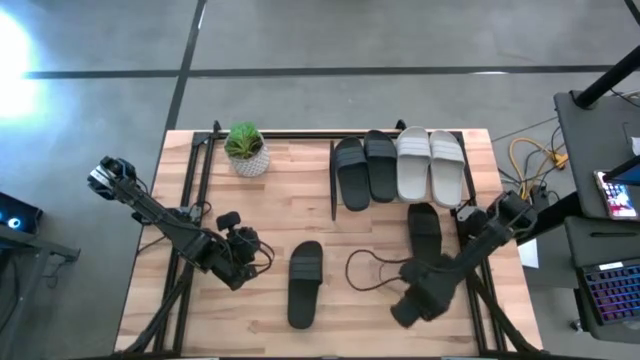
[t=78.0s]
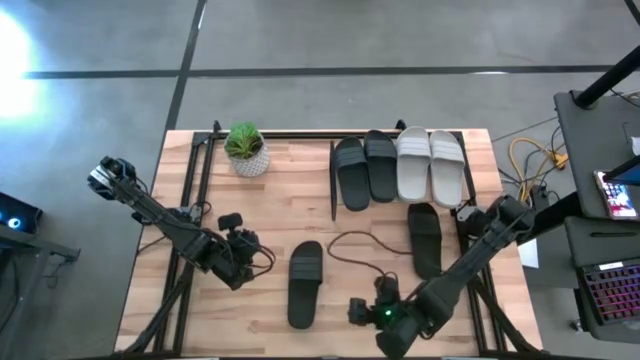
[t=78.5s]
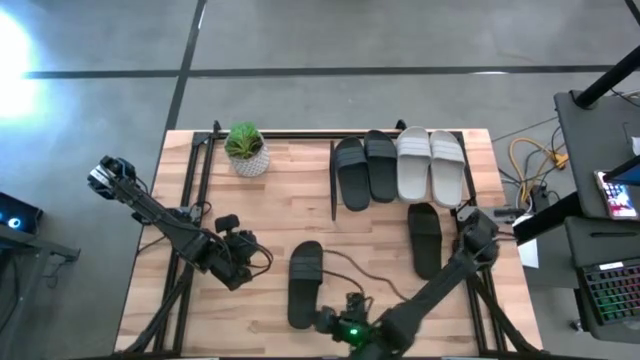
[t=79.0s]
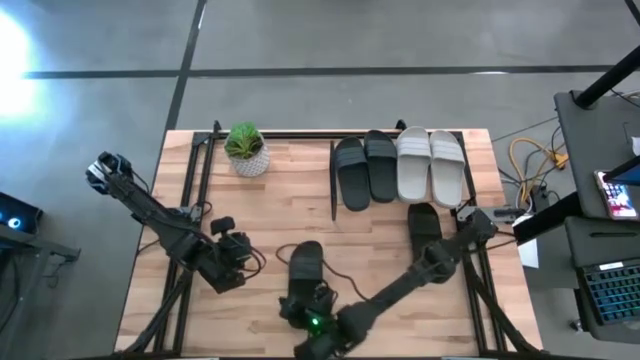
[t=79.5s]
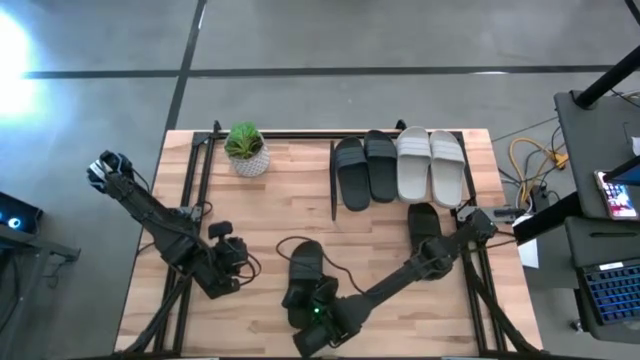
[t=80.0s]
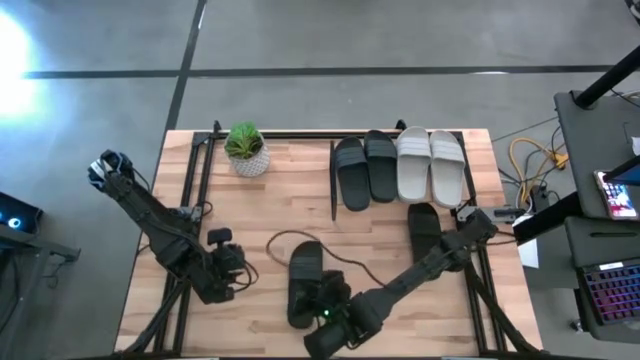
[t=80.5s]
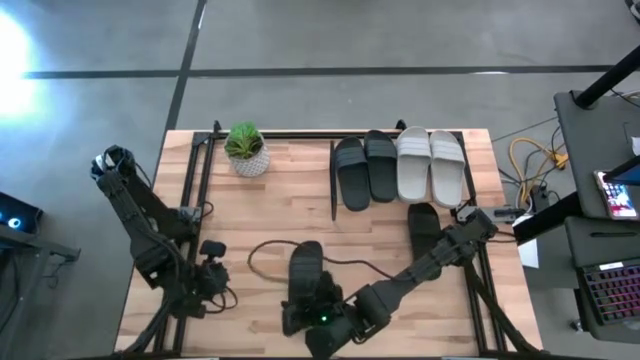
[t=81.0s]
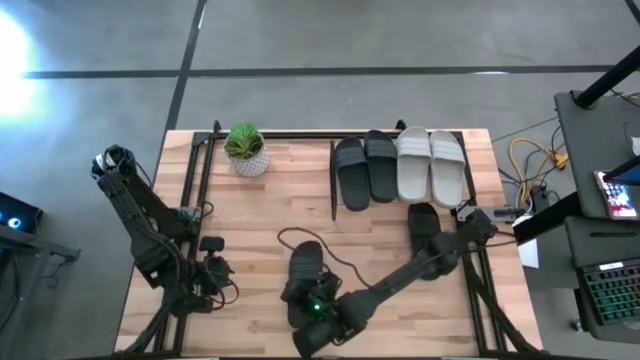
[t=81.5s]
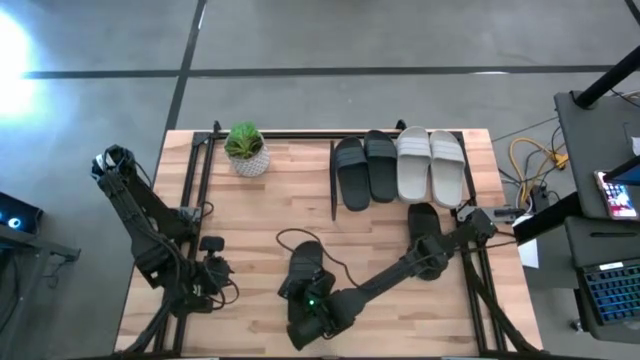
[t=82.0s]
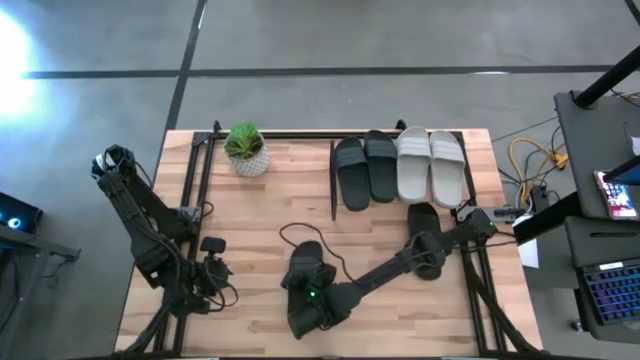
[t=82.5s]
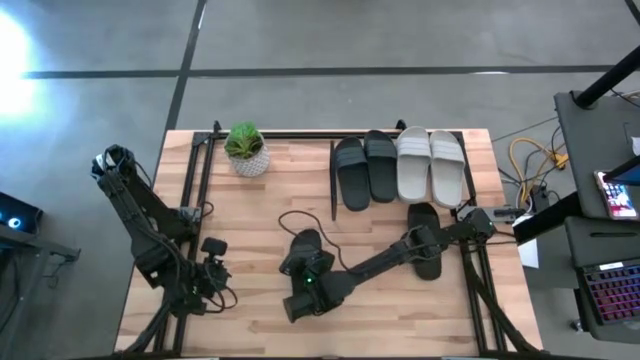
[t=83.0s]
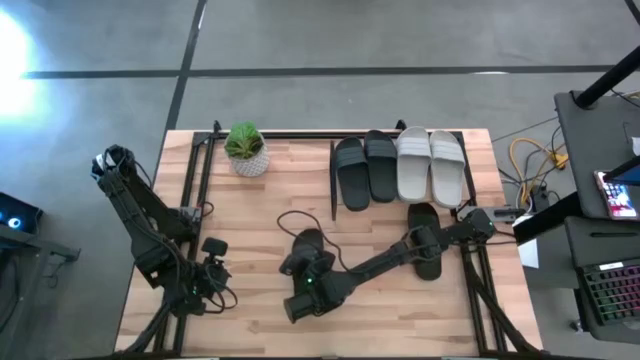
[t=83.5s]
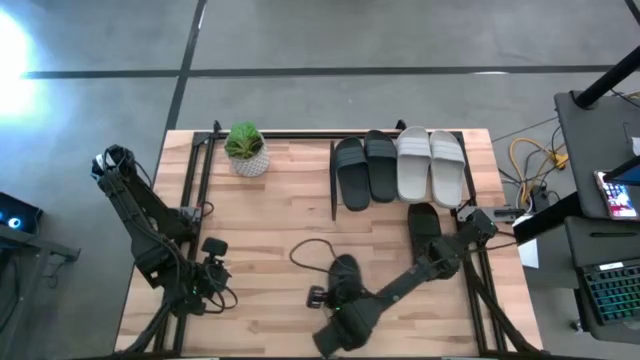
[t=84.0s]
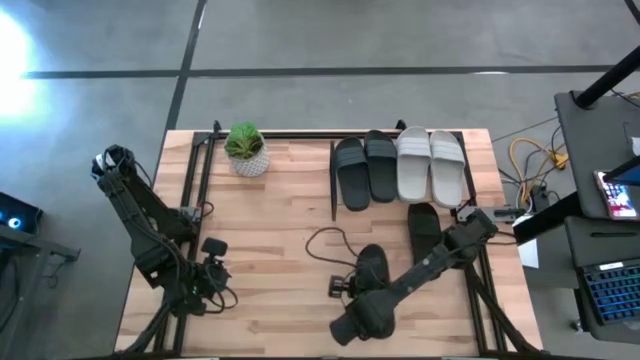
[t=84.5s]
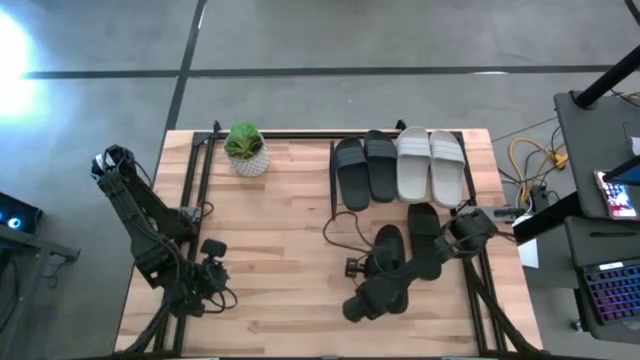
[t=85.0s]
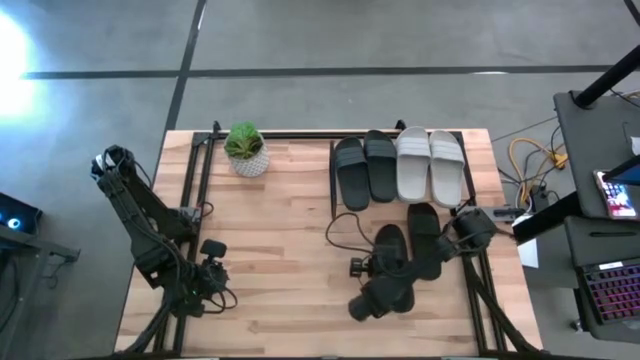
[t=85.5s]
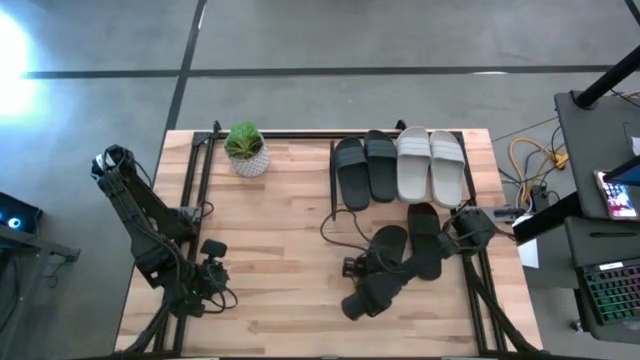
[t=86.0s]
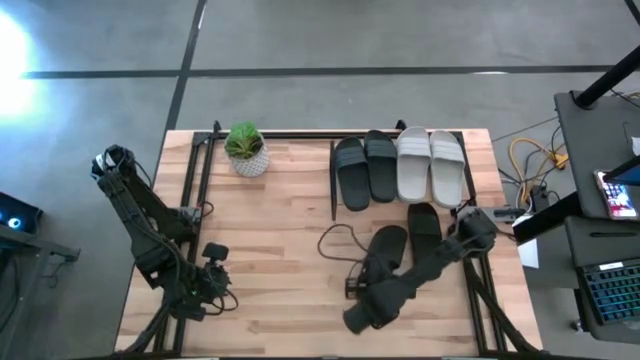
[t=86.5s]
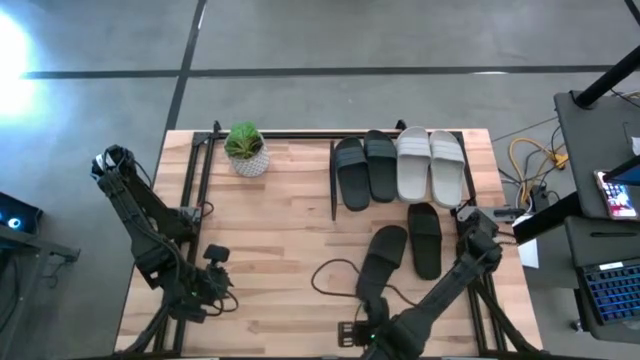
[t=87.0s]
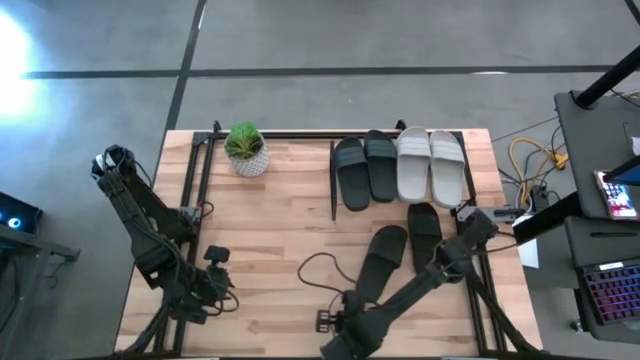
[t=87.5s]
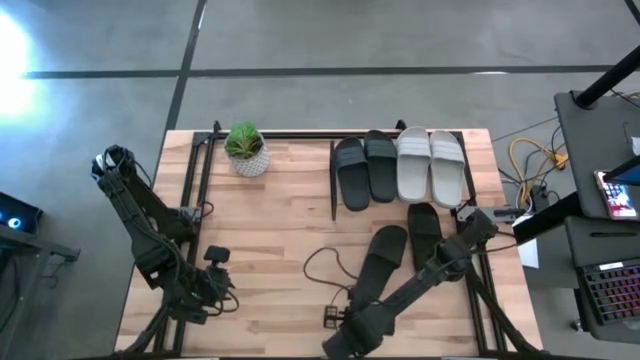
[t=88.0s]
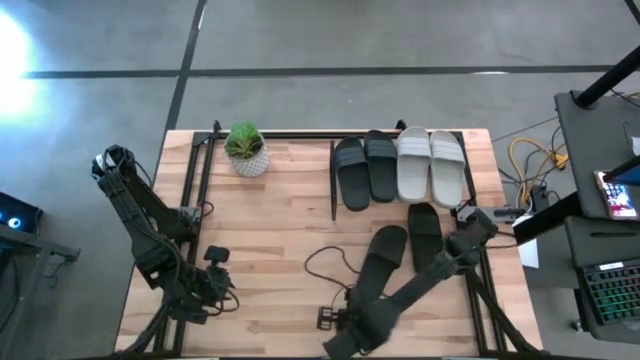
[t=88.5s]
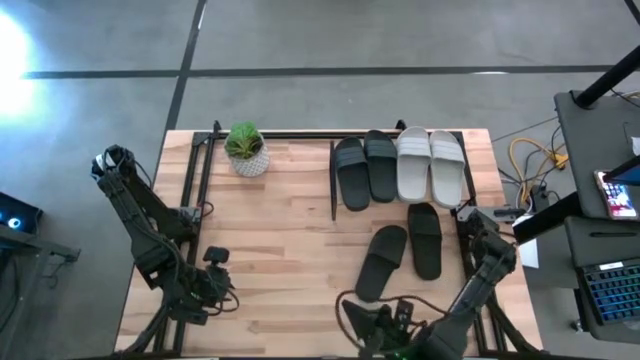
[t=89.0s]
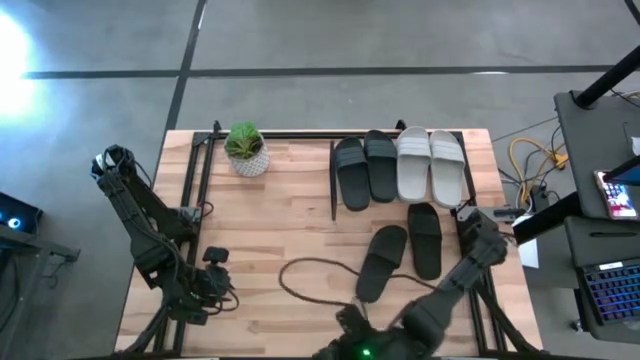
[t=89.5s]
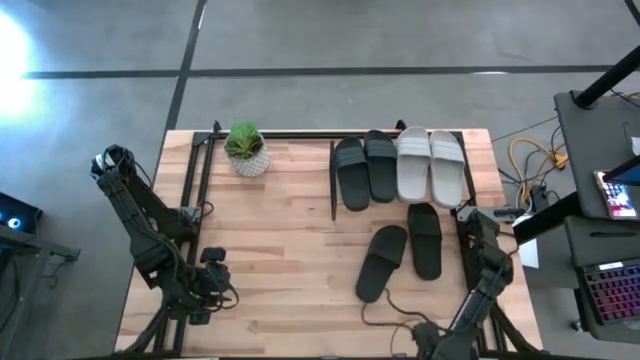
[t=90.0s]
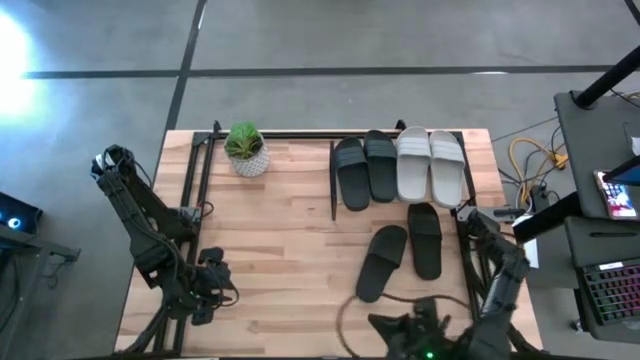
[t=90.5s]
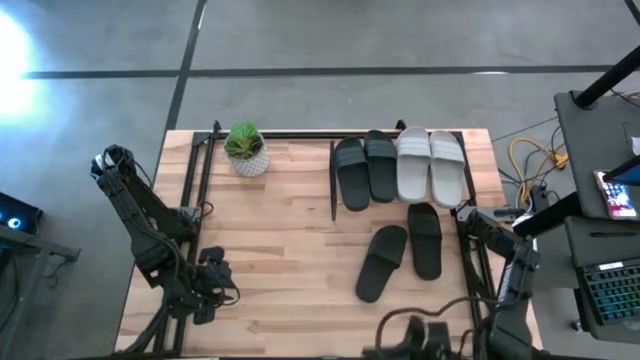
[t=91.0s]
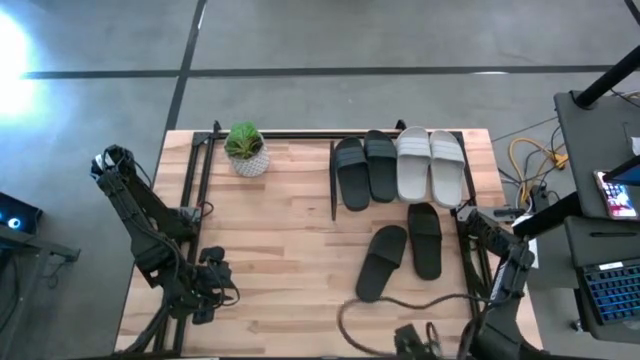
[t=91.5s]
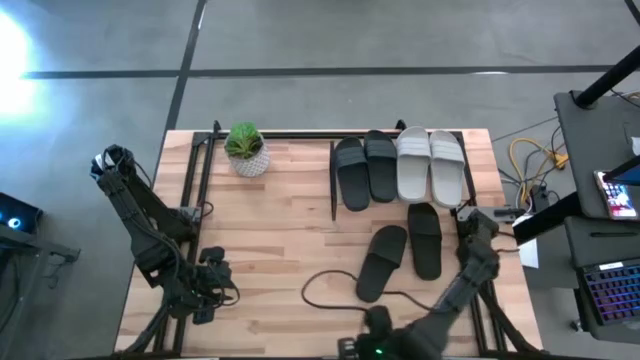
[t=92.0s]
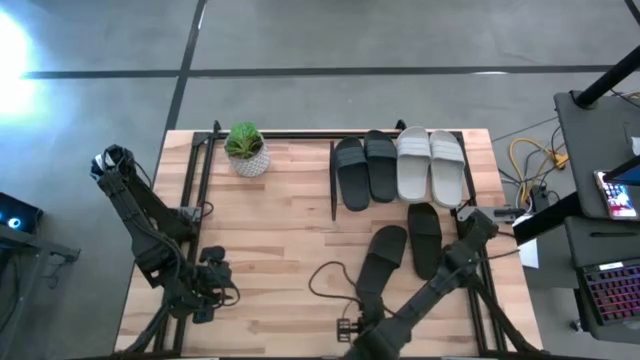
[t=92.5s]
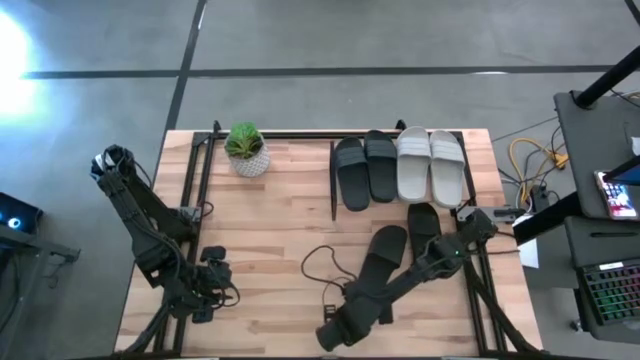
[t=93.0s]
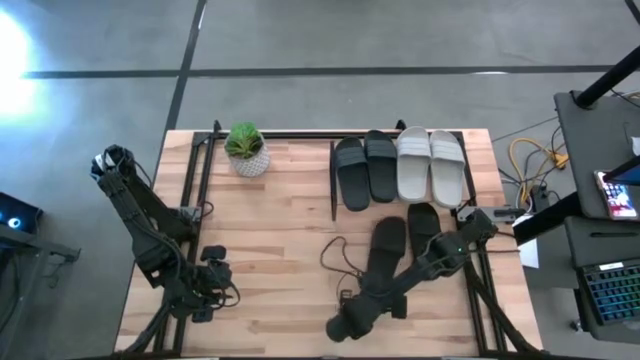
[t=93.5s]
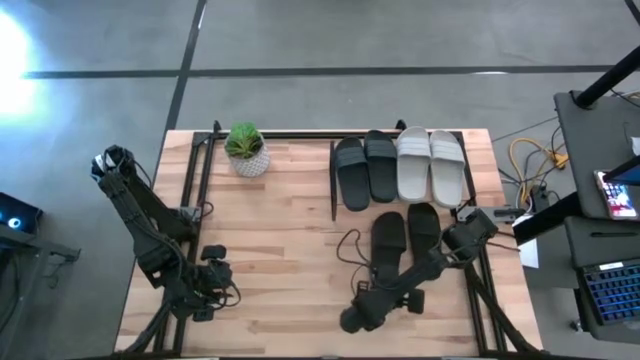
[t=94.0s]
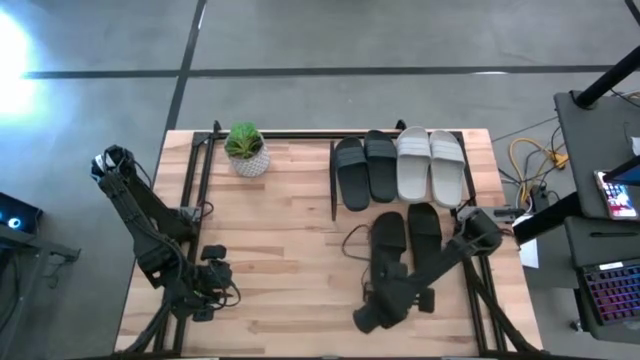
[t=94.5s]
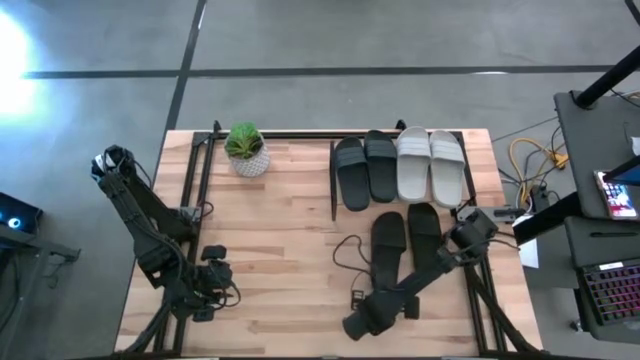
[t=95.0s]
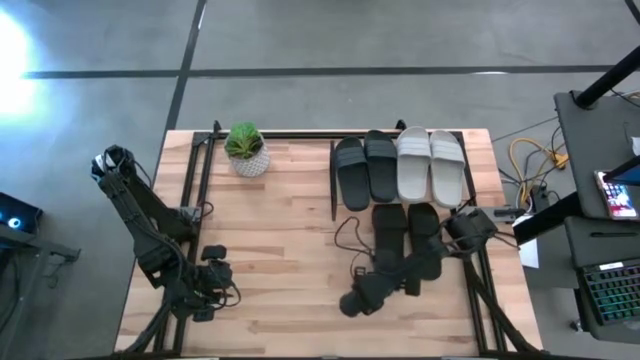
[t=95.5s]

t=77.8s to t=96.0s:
Task: Pick and place slides into the shelf
Put the black slide under the shelf

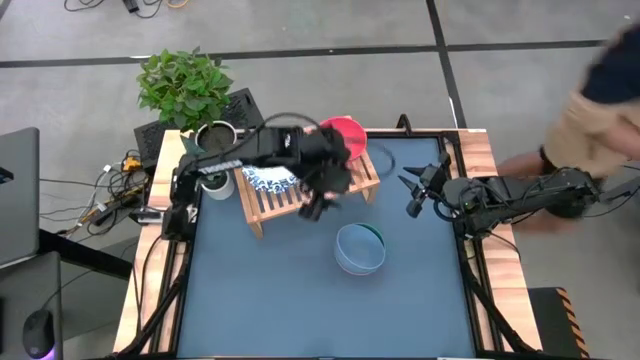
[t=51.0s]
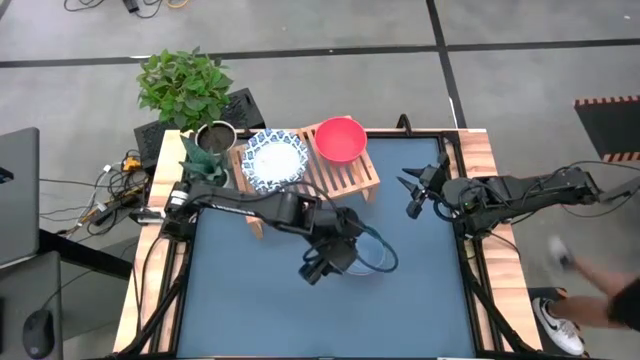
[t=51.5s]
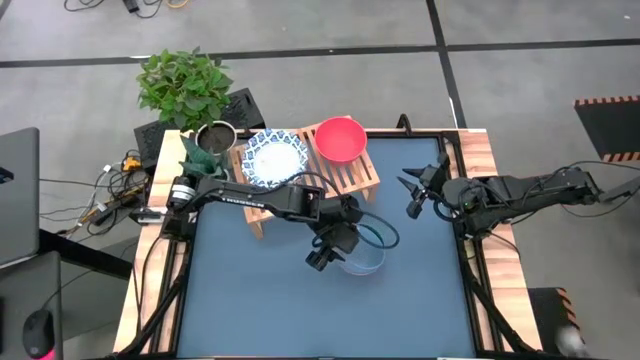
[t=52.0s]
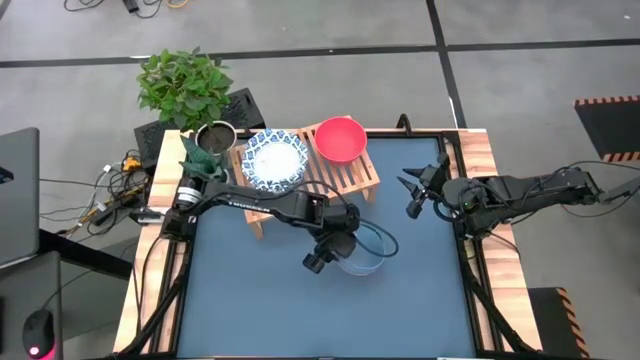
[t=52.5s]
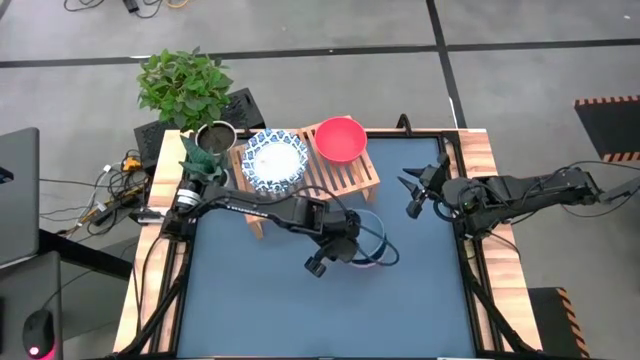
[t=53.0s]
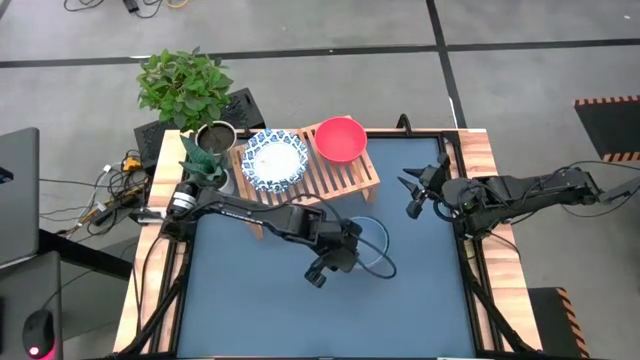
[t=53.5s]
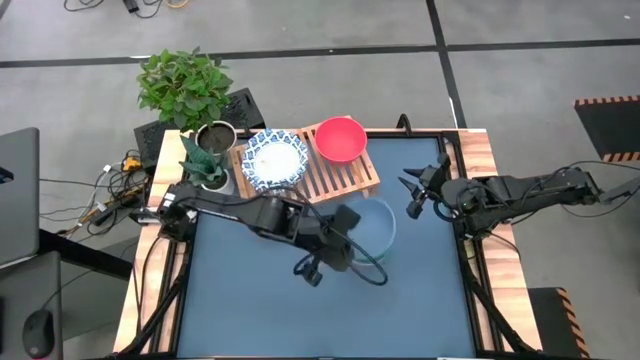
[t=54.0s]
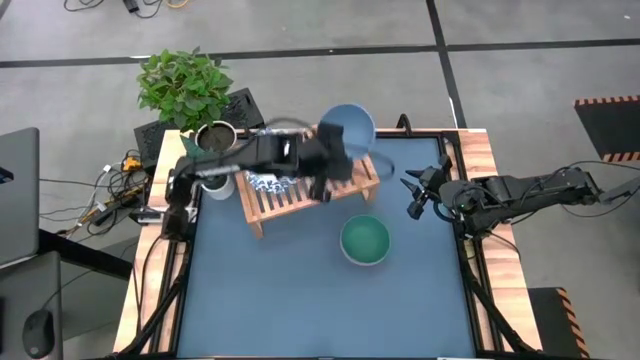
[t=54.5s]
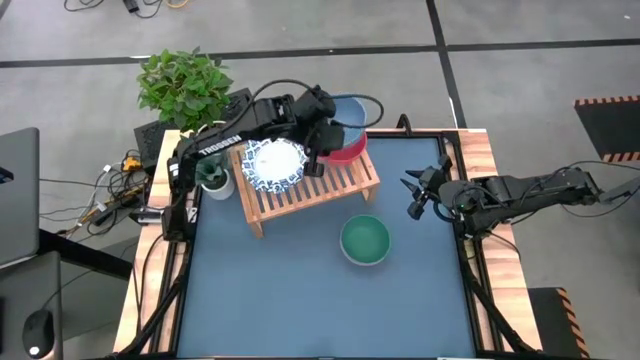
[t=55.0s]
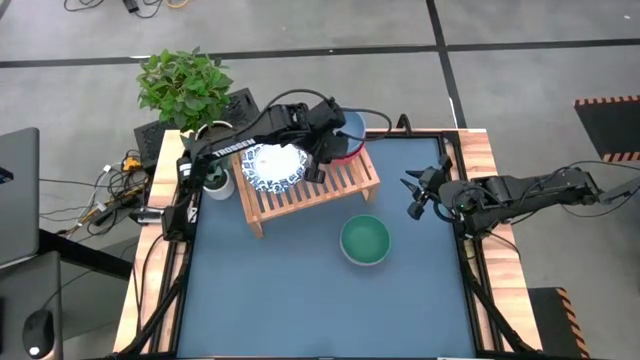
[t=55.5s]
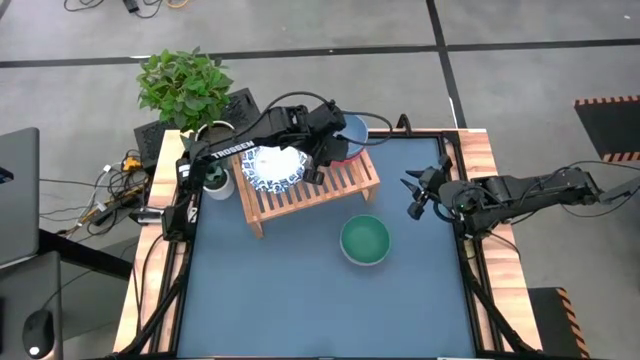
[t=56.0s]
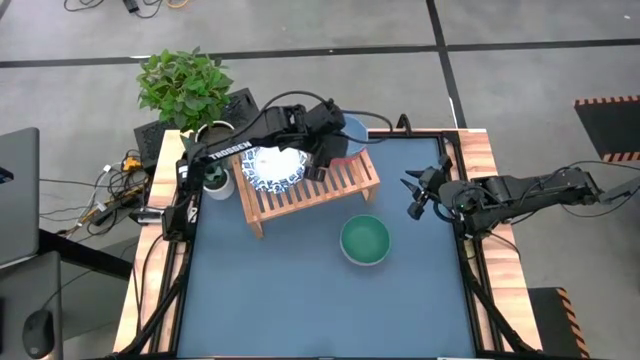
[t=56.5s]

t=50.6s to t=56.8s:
Task: Place and stack bowls onto a shelf
Stack the blue bowl on top of the orange bowl on the shelf
